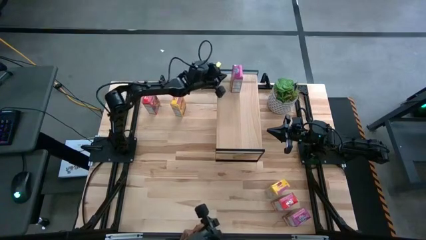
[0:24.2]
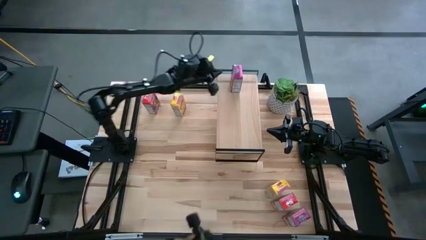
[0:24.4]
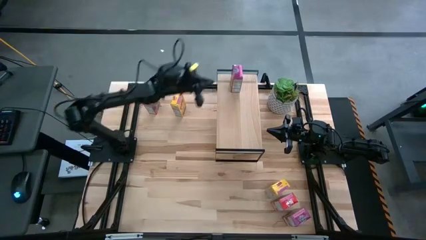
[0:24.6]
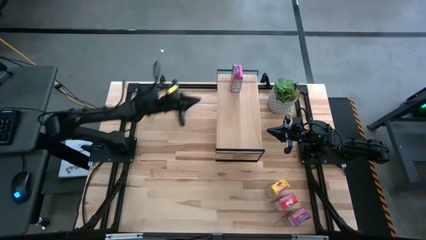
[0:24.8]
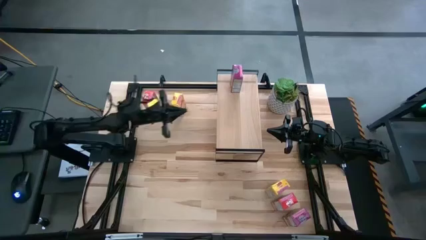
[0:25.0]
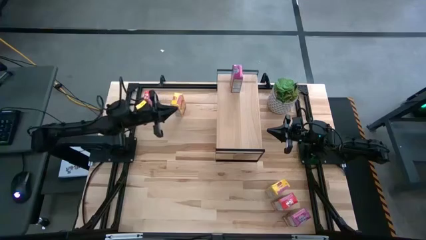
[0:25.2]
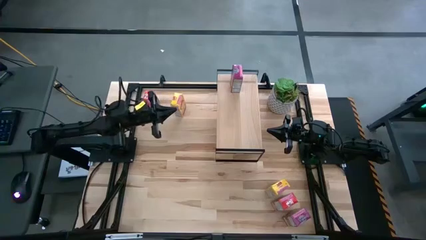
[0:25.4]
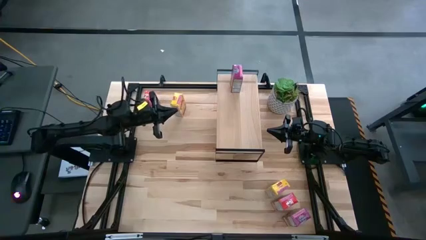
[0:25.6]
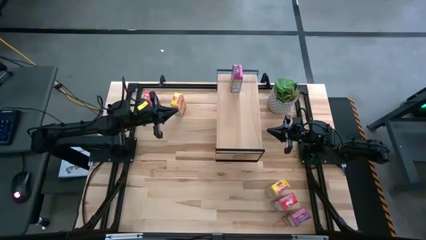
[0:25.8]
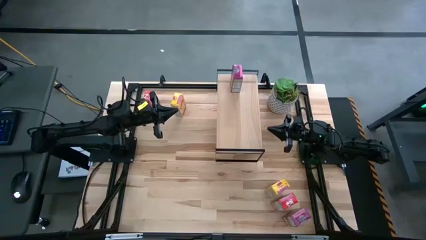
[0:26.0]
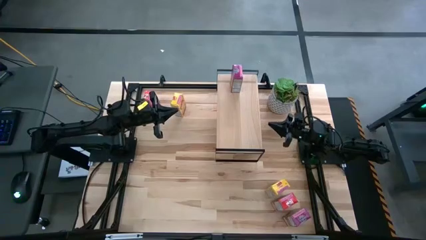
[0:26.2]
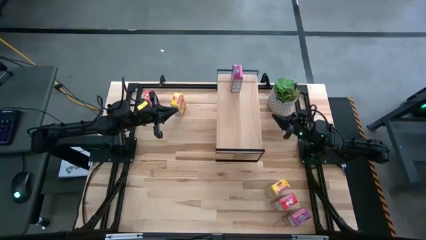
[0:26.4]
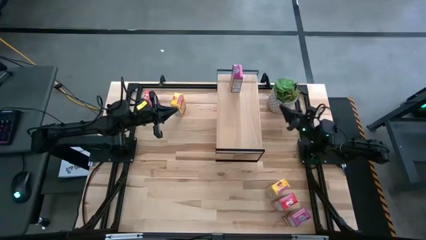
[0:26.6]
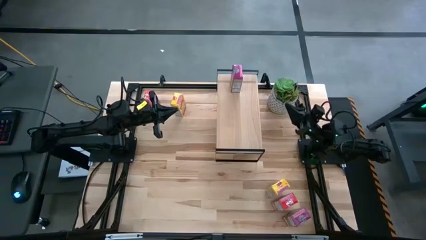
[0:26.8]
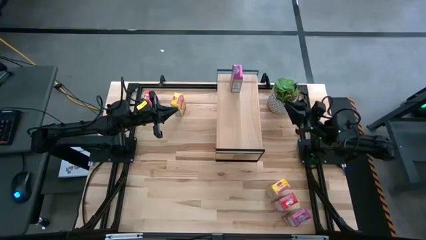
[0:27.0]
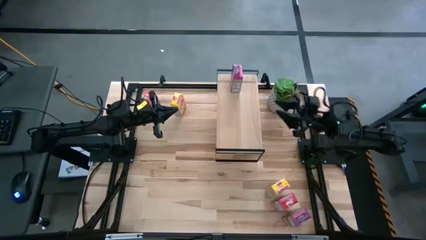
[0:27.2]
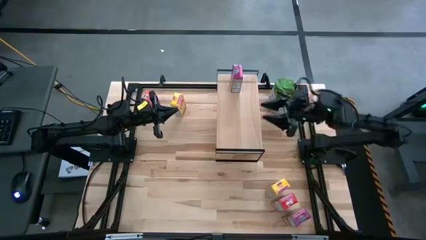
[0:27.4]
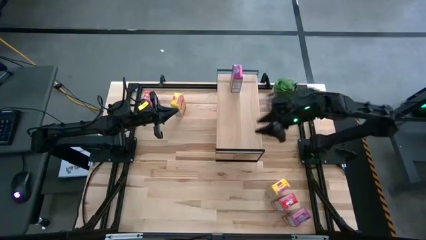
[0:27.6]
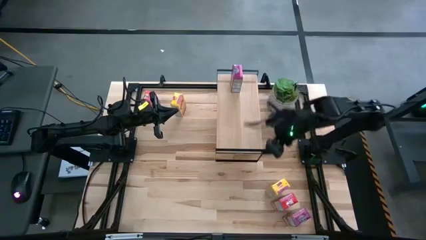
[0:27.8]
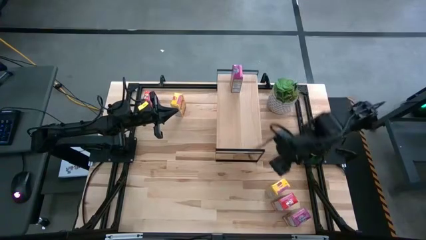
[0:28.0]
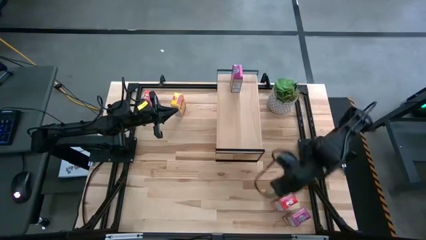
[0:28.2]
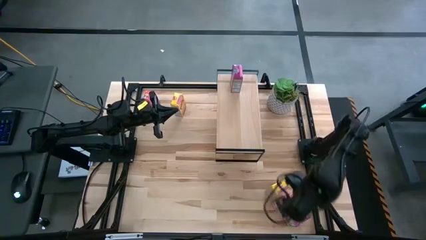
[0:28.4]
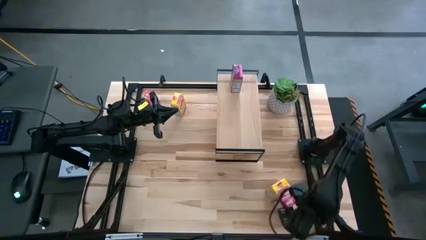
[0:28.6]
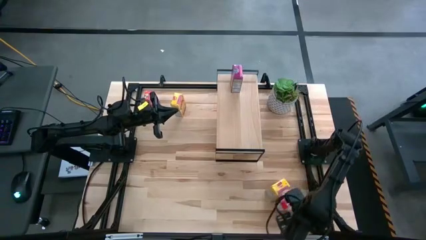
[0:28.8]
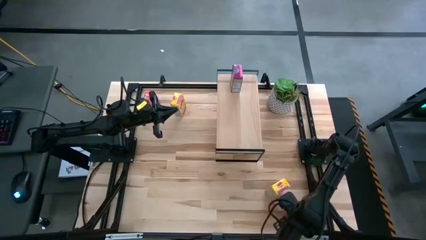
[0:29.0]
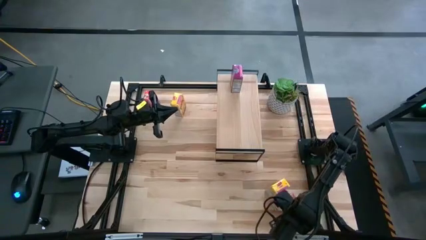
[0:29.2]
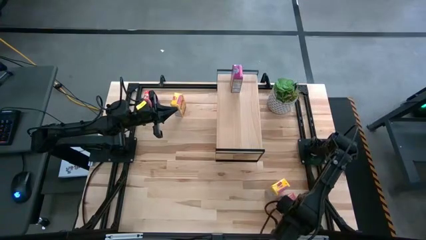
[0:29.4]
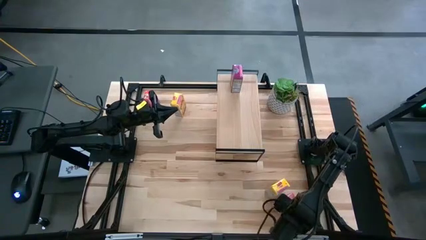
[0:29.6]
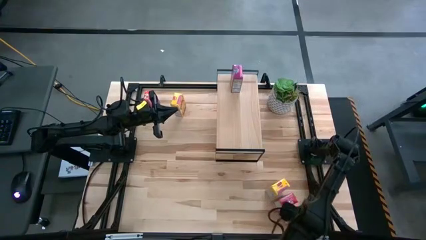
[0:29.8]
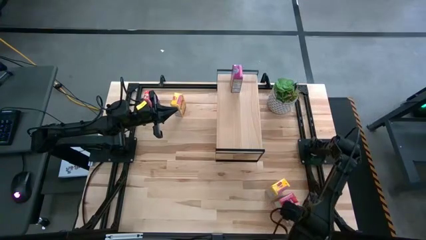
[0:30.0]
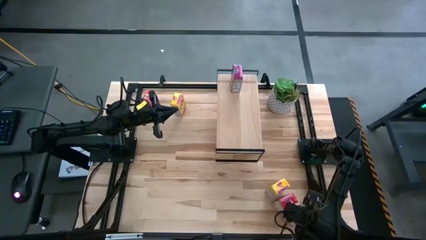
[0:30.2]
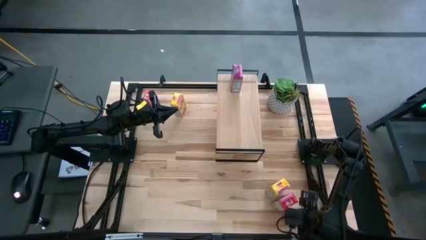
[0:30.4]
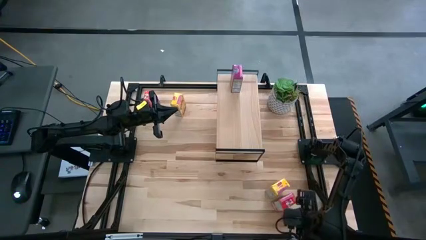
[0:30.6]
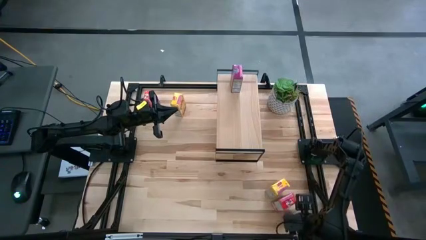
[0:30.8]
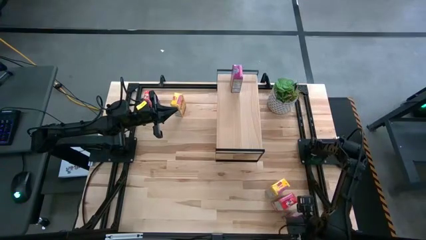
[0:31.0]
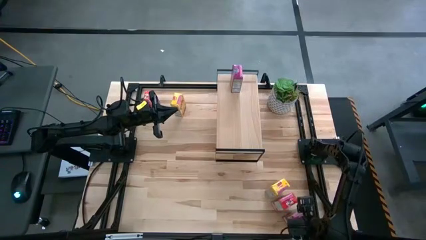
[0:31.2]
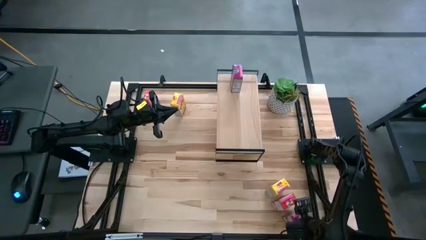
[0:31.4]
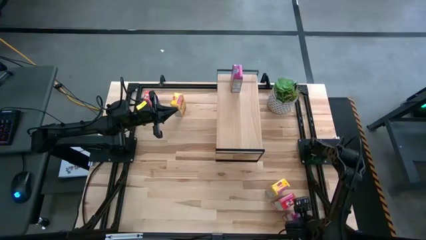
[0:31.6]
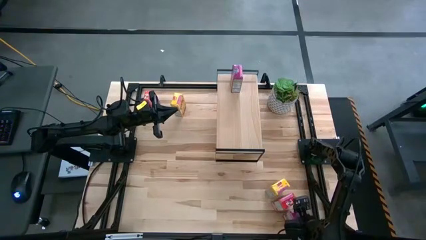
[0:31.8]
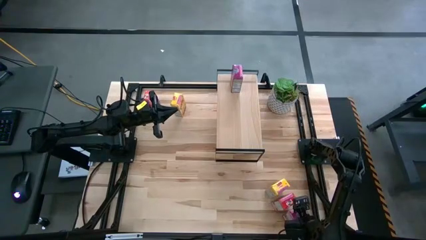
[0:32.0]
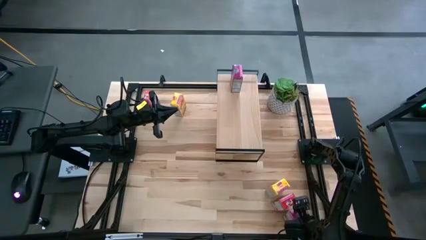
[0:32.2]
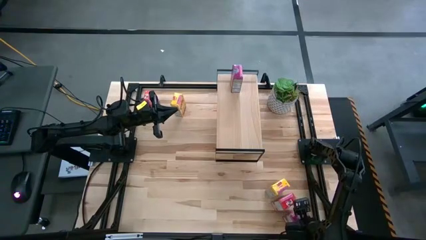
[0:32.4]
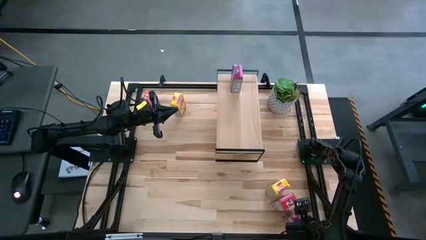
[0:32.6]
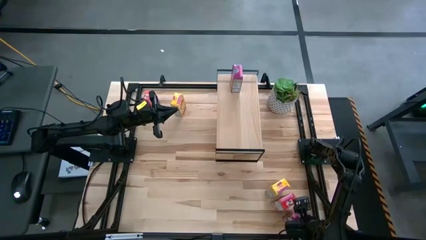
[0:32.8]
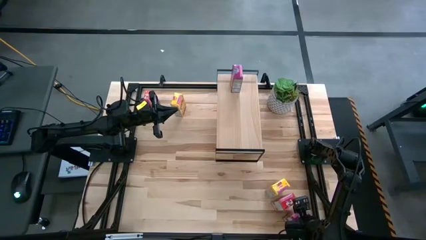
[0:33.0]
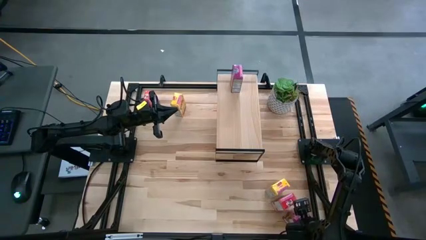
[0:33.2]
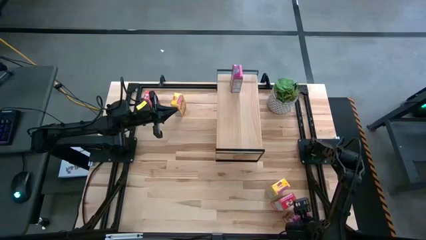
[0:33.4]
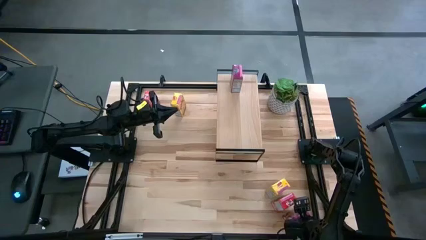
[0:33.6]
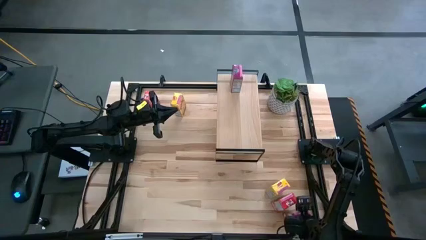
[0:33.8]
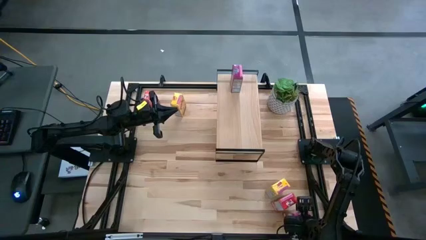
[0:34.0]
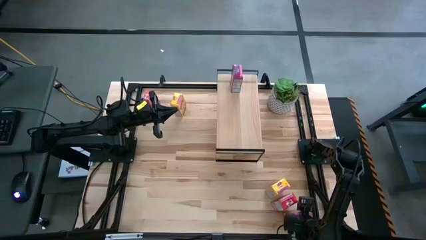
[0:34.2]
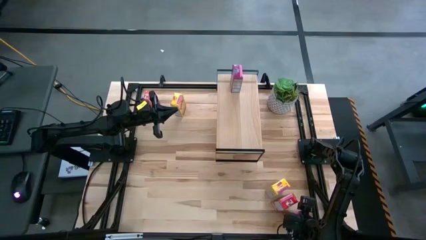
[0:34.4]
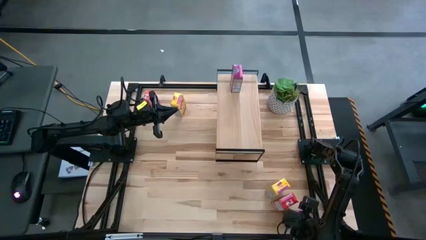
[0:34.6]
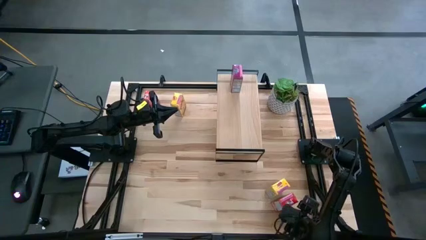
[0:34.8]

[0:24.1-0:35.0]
Task: Stack cereal on shelf
Put the purple cereal box on the shelf aligned with the purple cereal box
